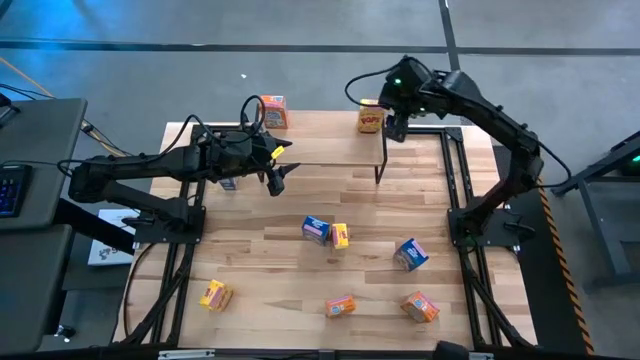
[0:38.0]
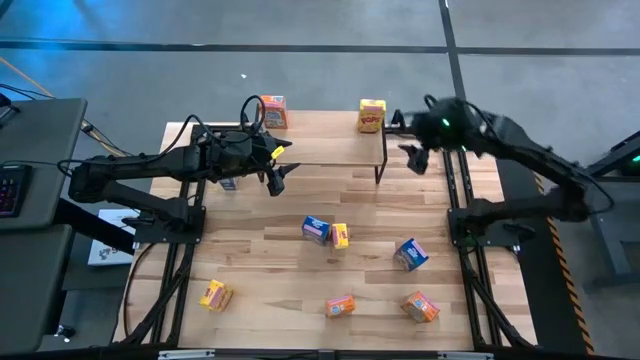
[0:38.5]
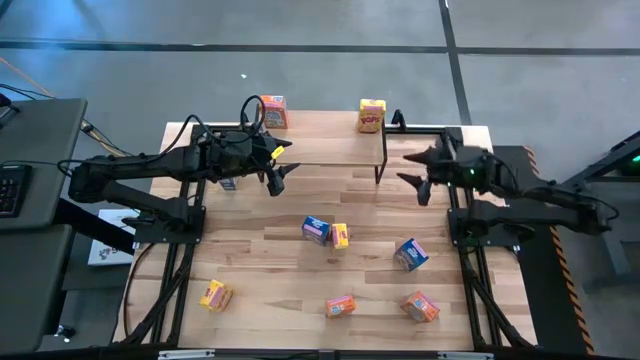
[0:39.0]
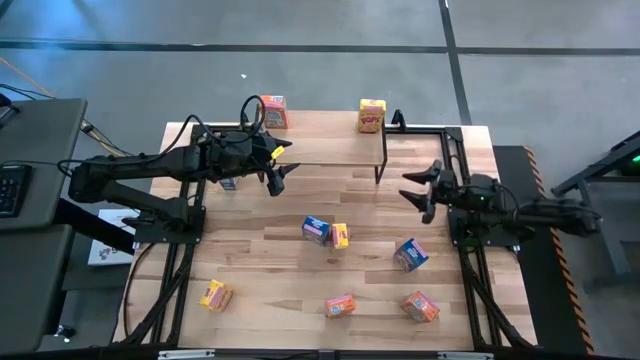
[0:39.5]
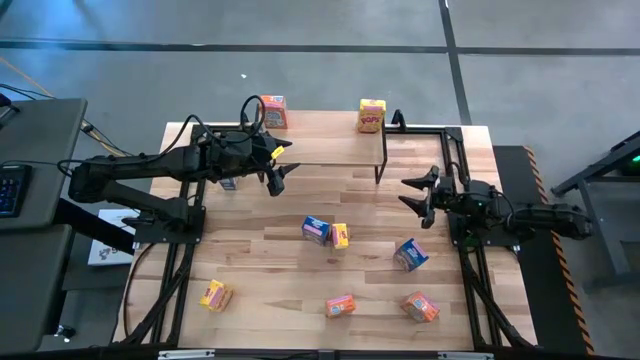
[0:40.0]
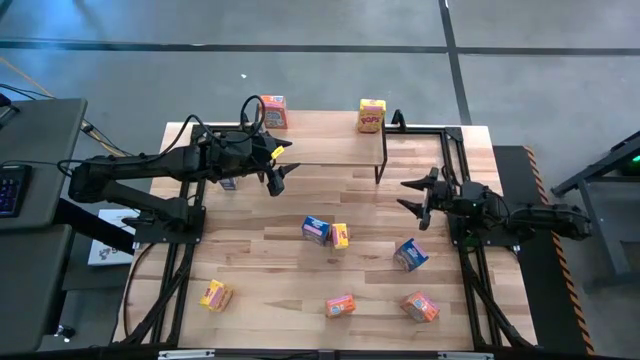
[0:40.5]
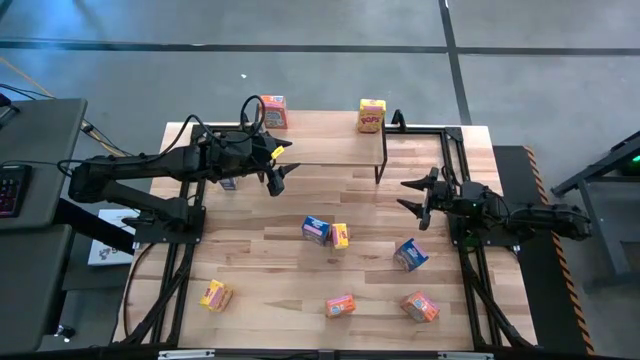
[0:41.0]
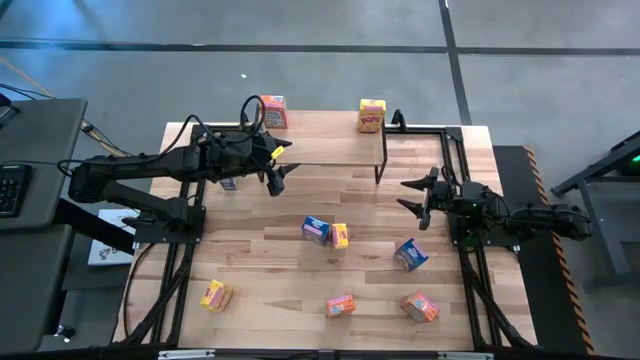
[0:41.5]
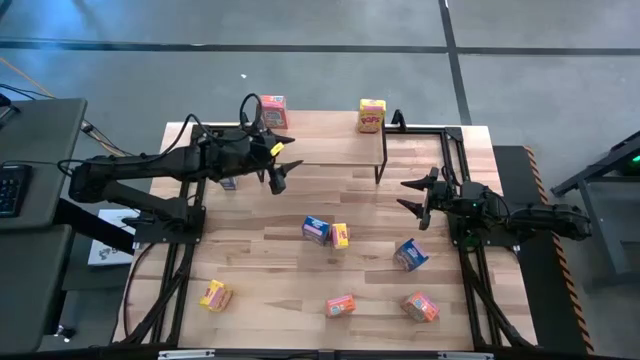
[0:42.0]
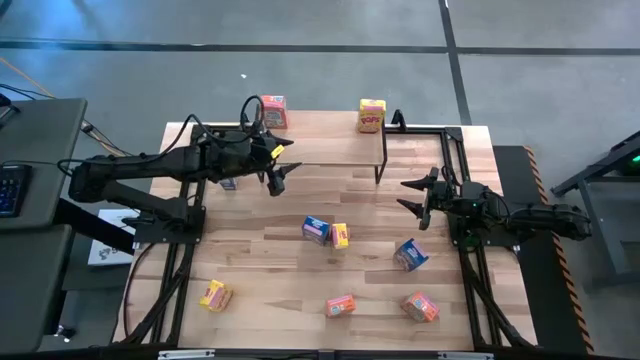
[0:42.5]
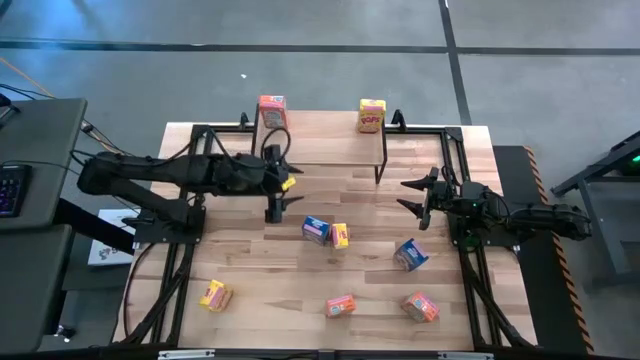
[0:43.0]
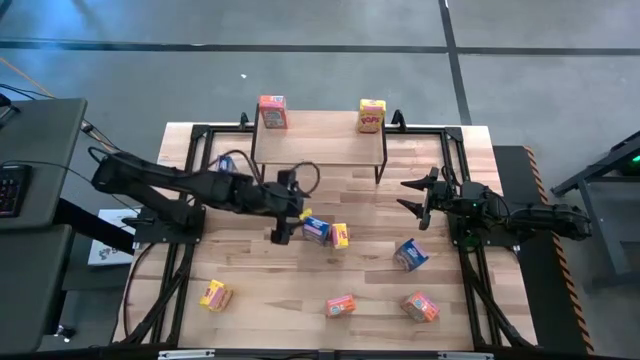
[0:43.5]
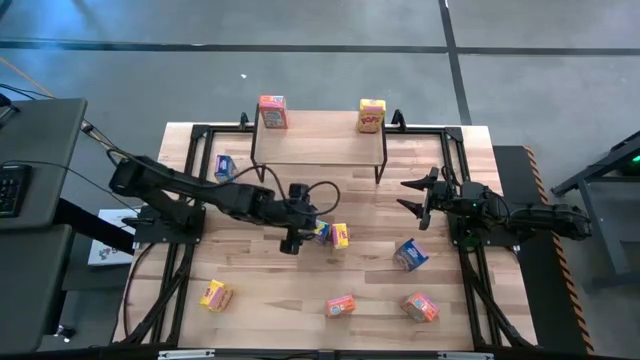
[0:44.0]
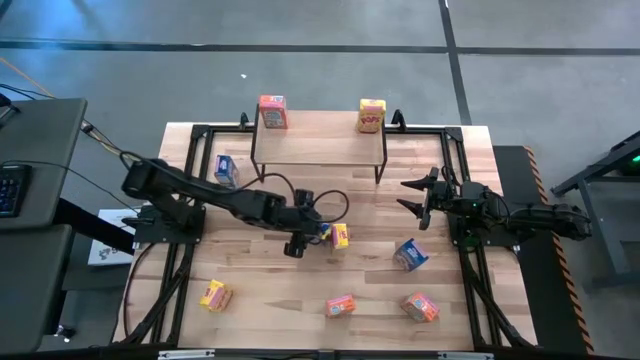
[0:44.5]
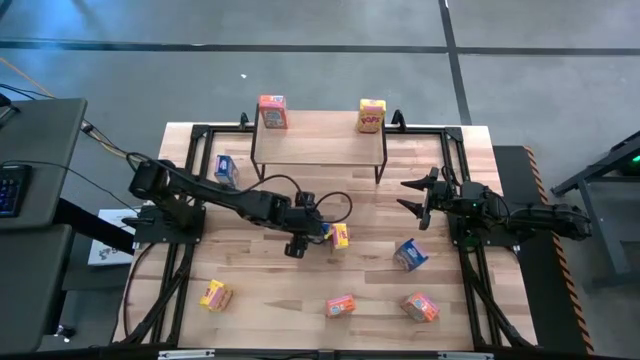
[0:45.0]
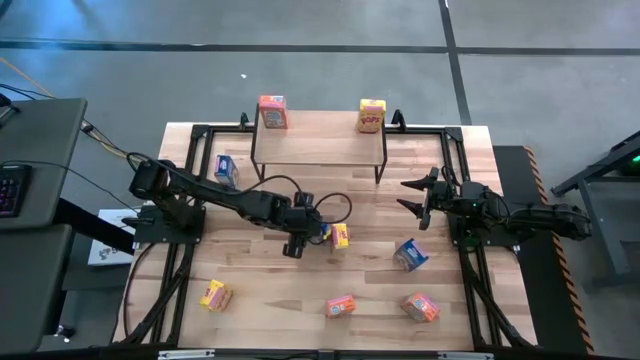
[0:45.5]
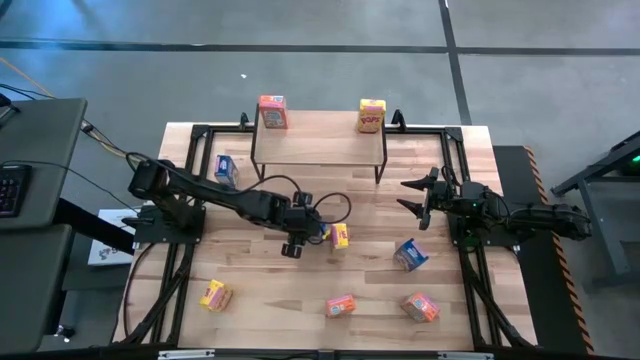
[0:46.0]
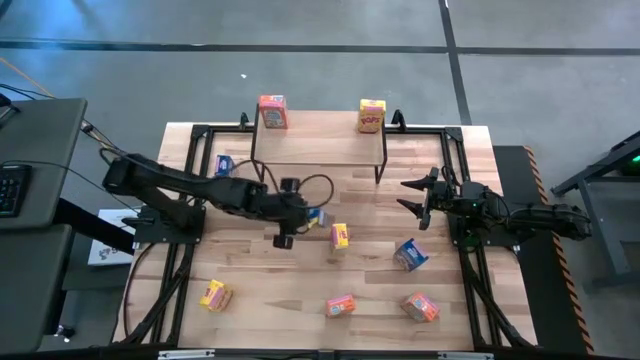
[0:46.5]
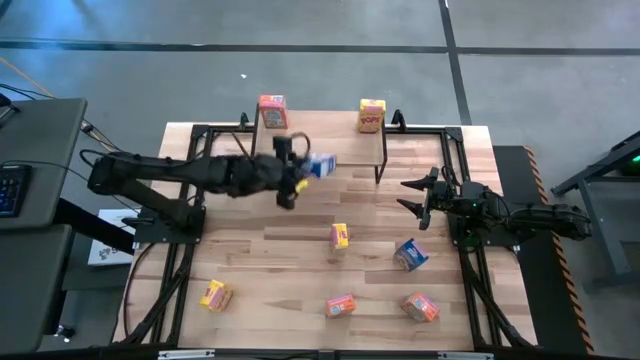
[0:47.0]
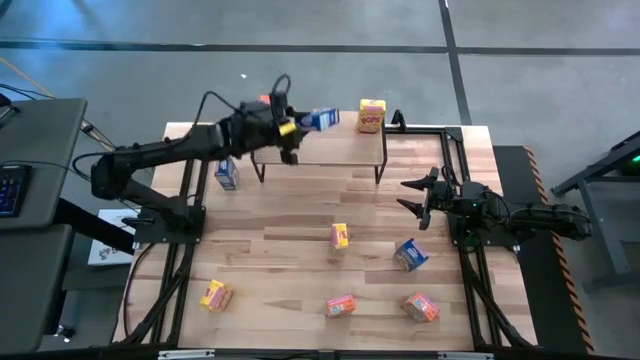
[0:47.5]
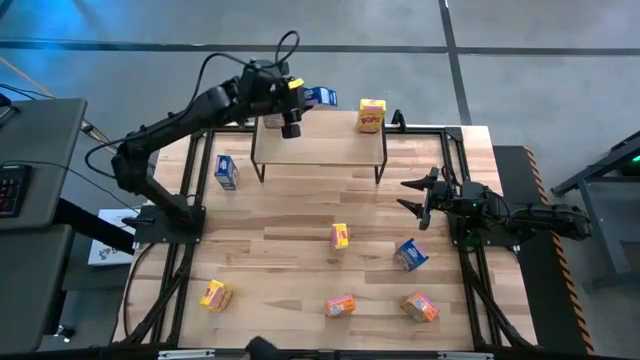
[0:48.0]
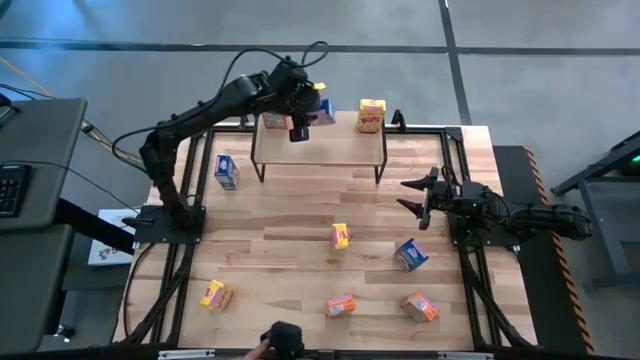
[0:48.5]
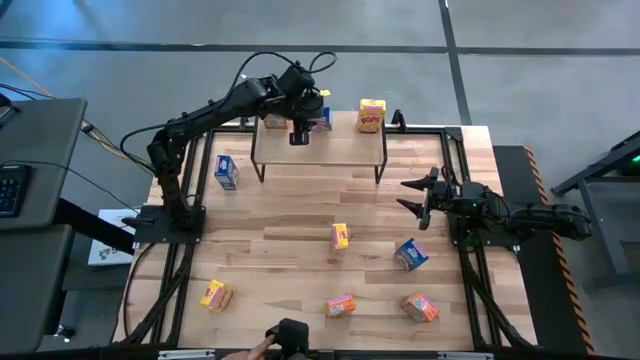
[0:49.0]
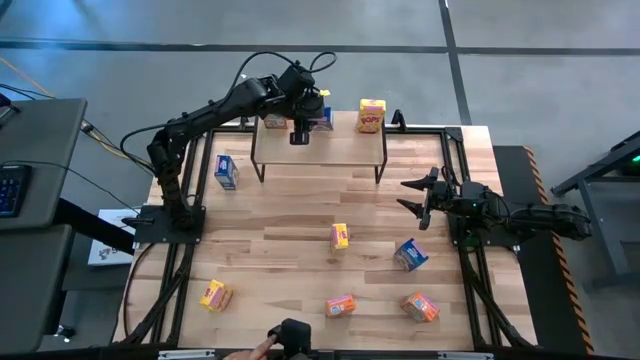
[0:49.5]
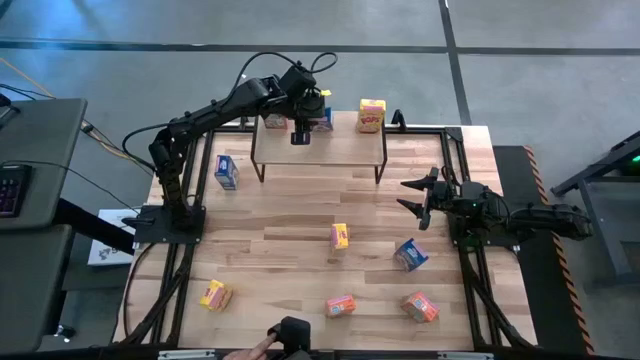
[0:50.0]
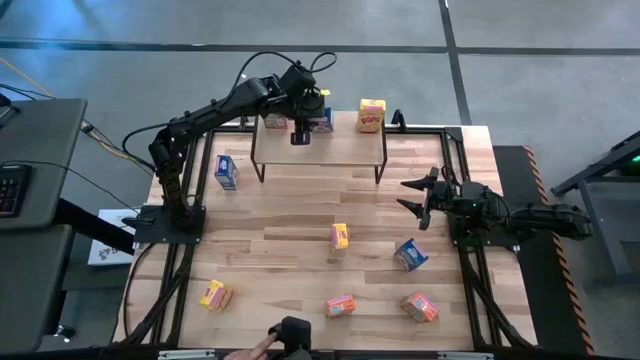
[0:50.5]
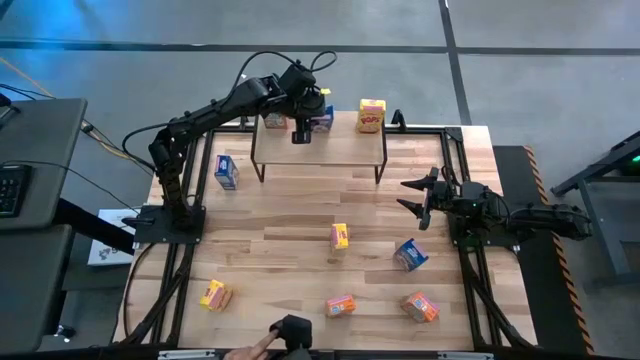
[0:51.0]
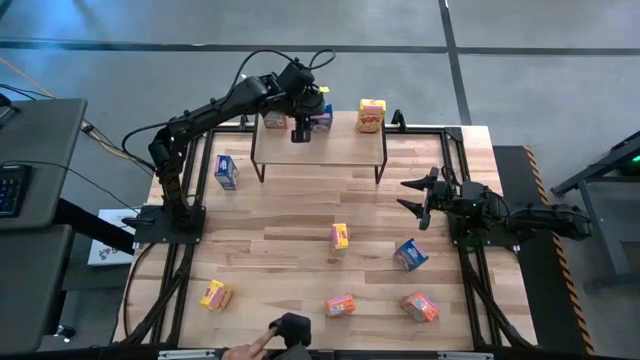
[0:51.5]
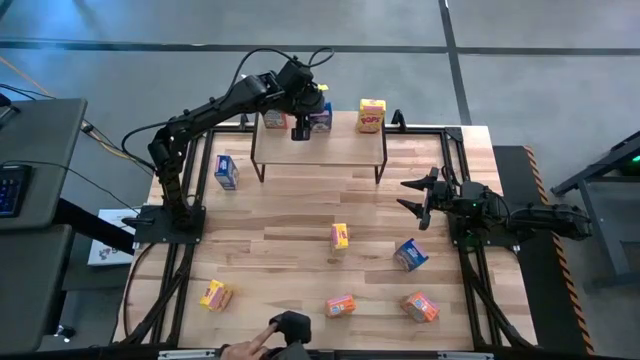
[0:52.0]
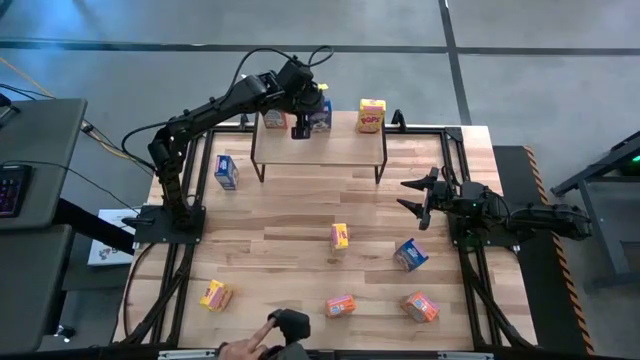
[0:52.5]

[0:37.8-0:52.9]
Task: Stack cereal on shelf
Put the middle blue cereal box on the shelf

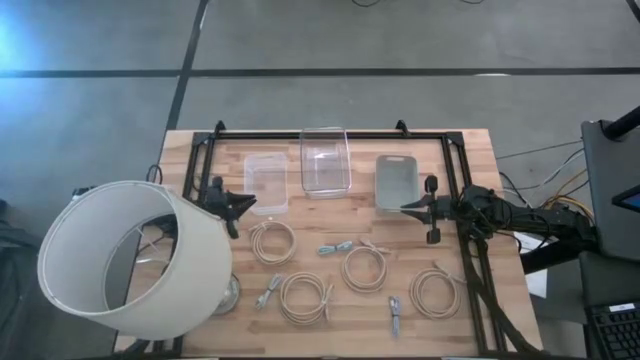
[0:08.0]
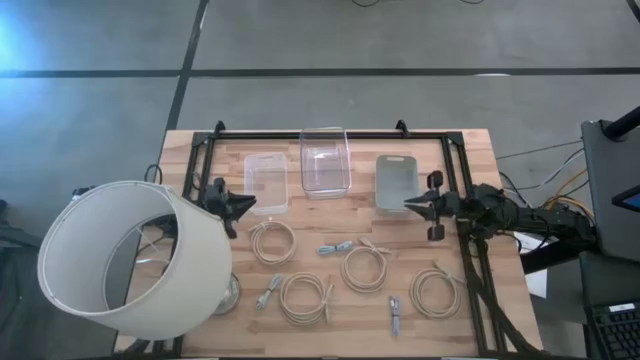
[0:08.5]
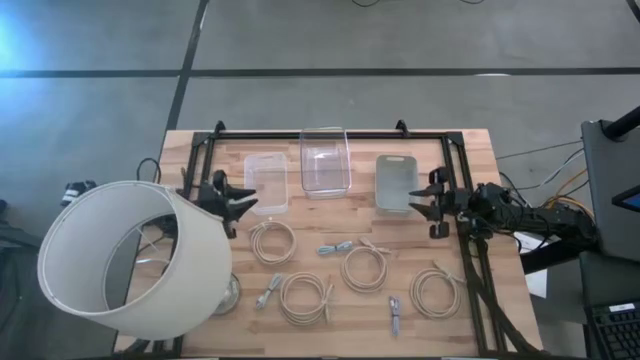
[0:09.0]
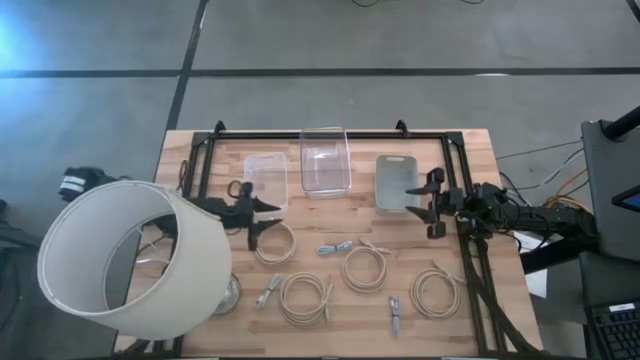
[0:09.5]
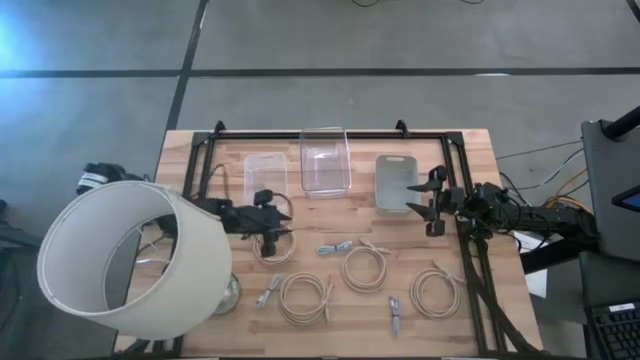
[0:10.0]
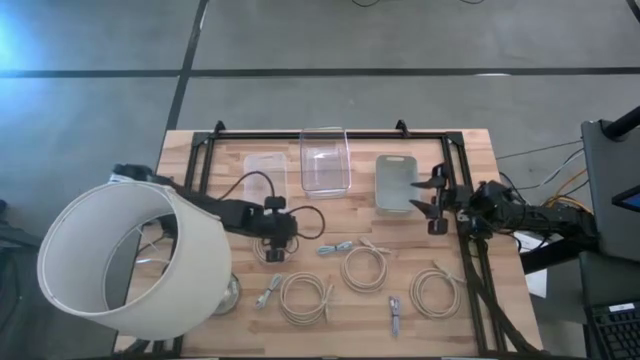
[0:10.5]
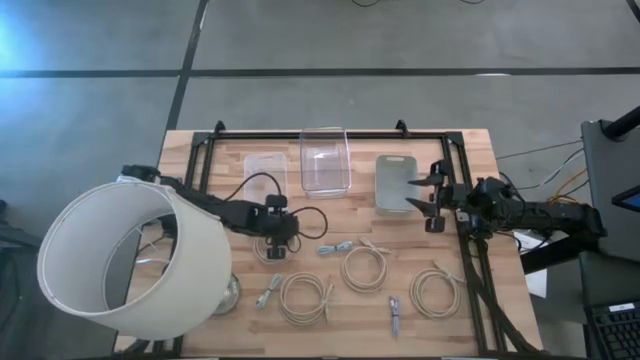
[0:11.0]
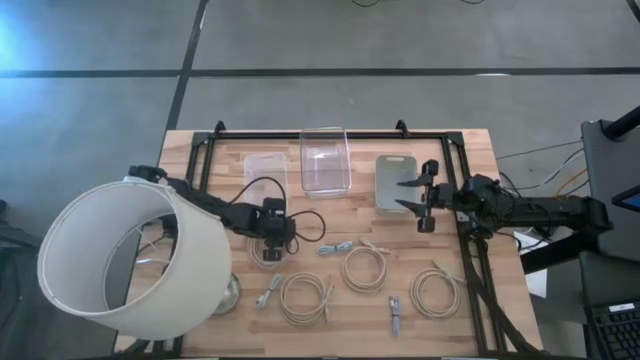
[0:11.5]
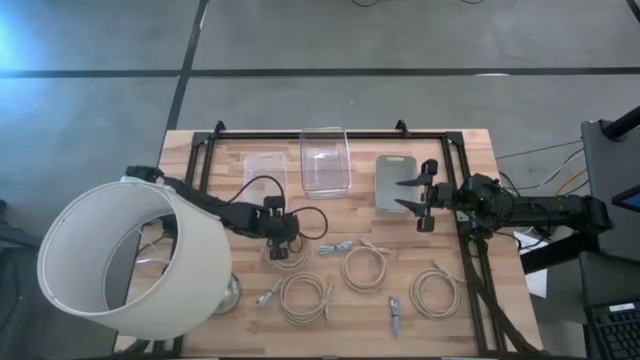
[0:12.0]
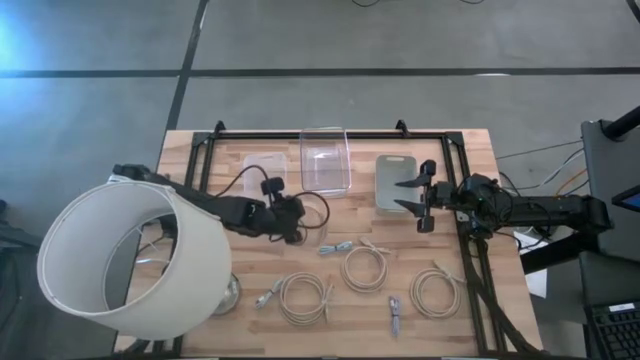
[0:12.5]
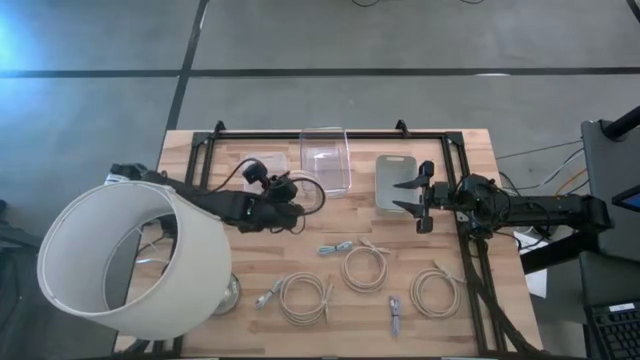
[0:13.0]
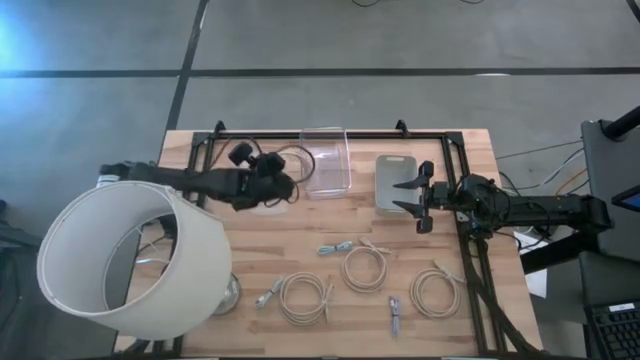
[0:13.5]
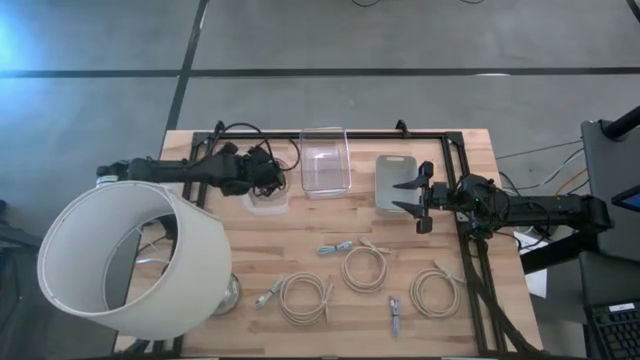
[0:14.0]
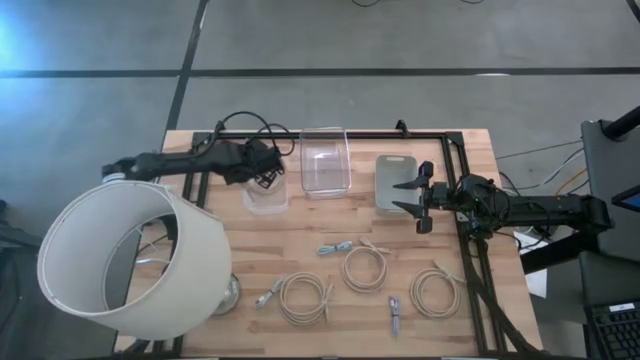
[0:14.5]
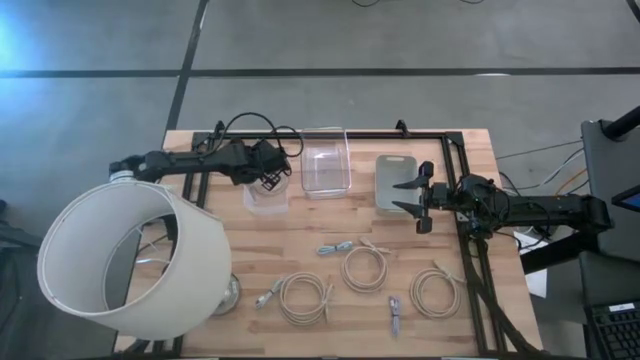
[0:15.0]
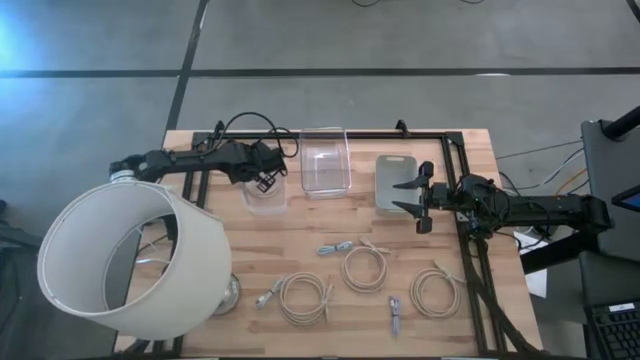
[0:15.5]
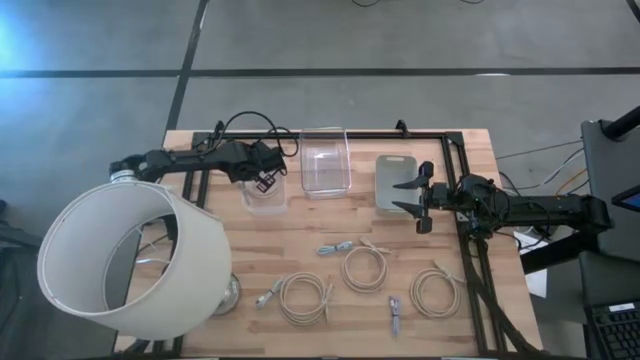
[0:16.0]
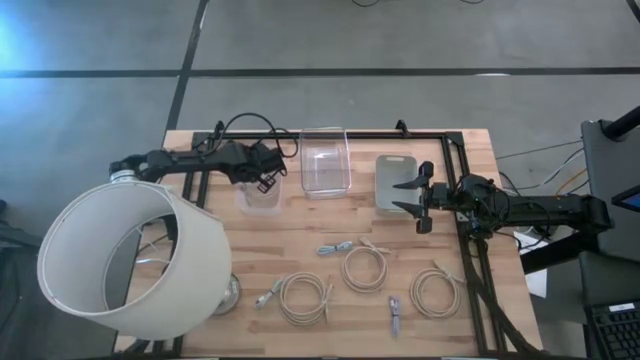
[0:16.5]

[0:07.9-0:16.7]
Task: Pick & Place USB Port
Put the brown USB cable into the white bin
